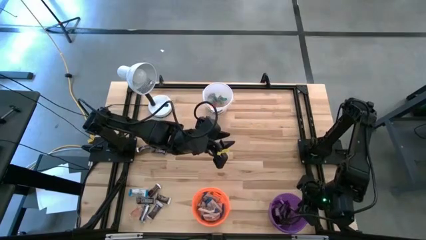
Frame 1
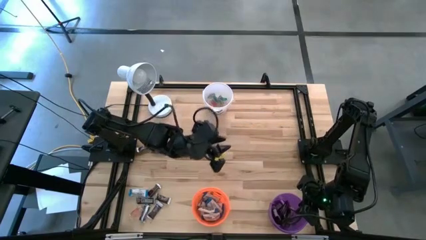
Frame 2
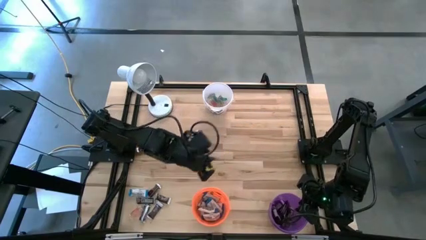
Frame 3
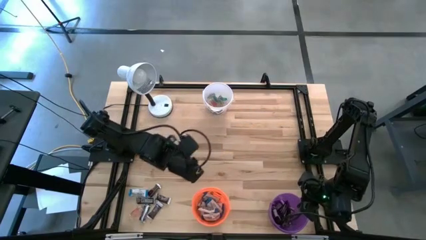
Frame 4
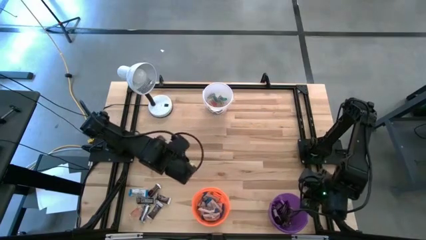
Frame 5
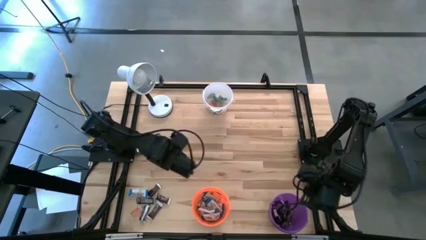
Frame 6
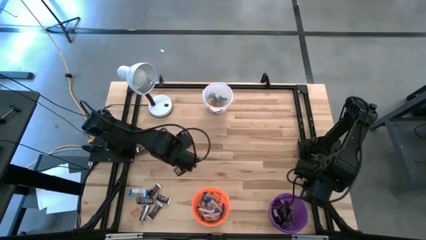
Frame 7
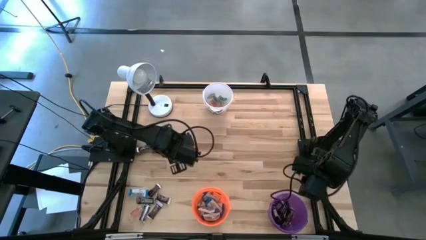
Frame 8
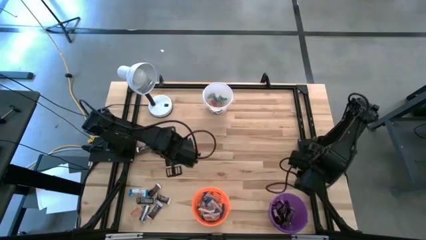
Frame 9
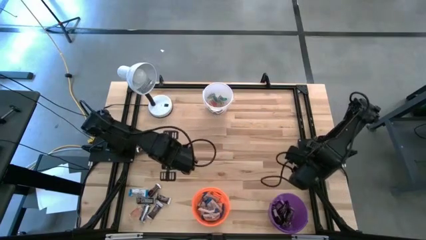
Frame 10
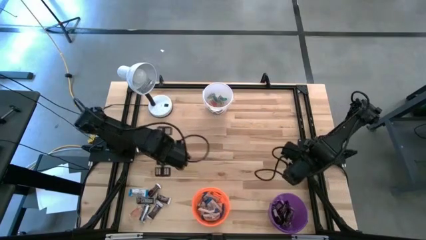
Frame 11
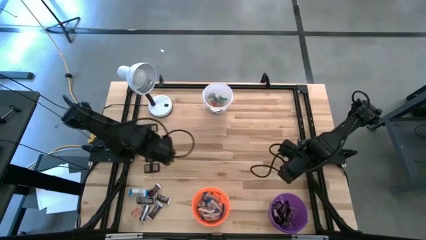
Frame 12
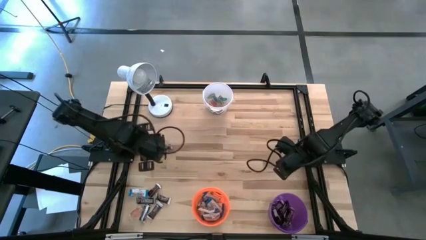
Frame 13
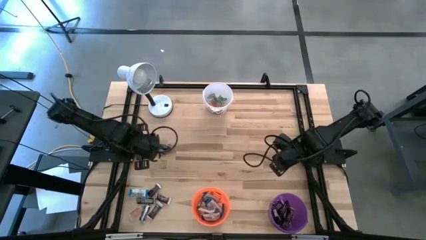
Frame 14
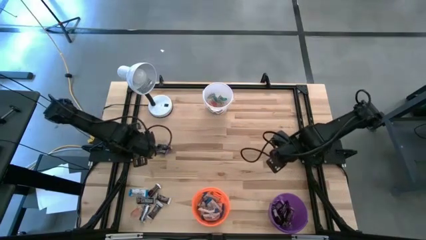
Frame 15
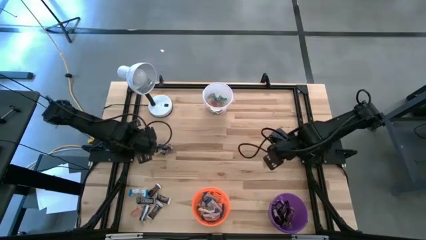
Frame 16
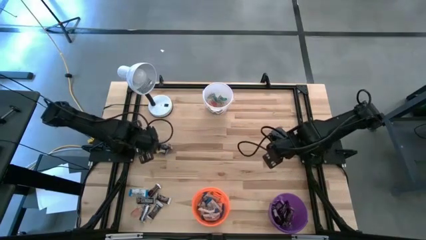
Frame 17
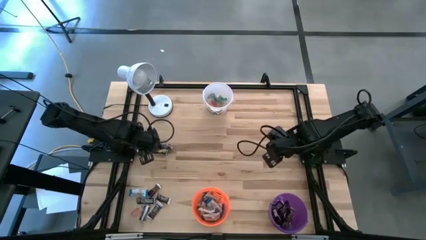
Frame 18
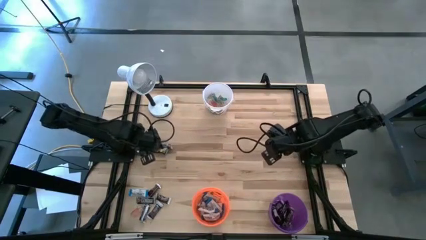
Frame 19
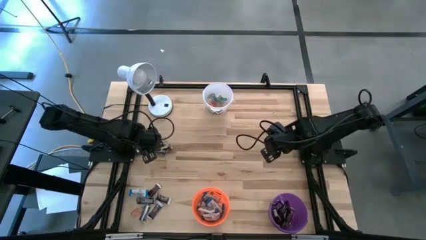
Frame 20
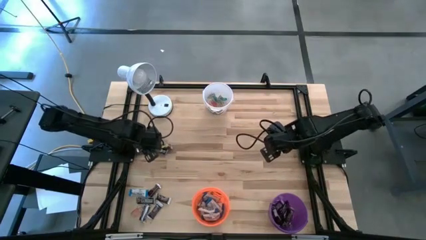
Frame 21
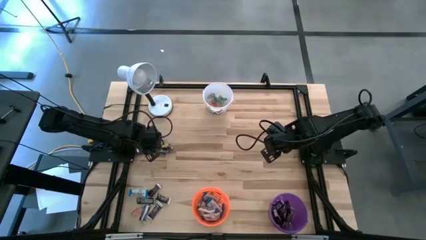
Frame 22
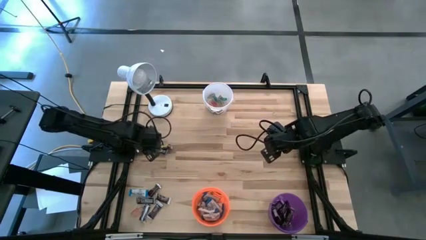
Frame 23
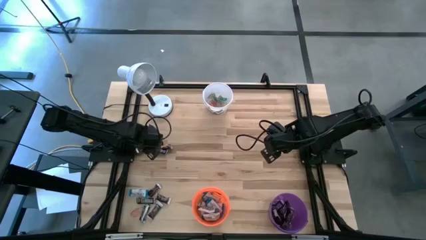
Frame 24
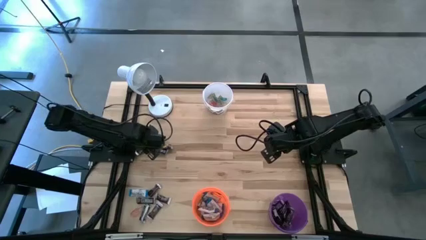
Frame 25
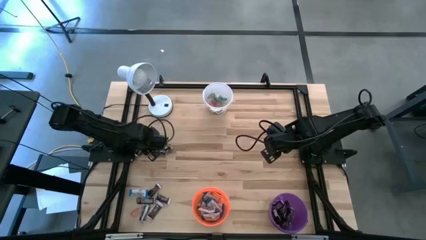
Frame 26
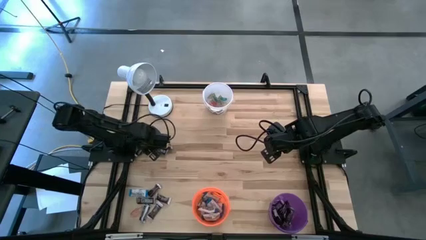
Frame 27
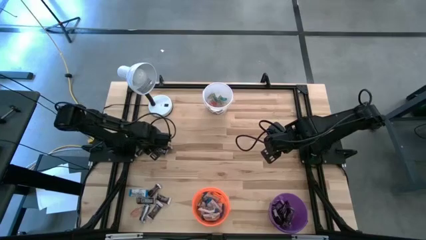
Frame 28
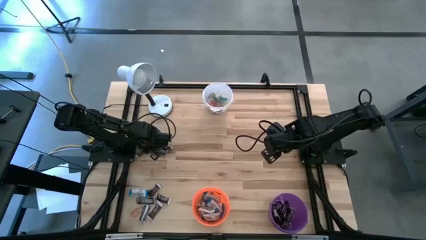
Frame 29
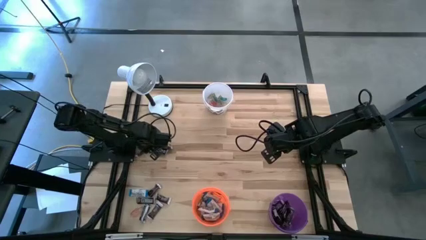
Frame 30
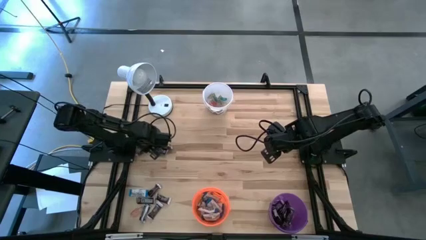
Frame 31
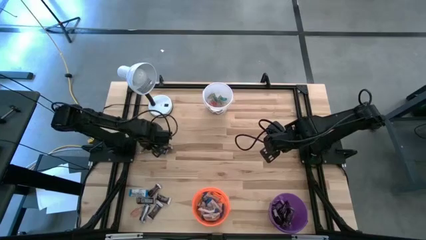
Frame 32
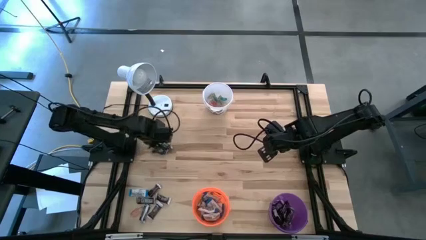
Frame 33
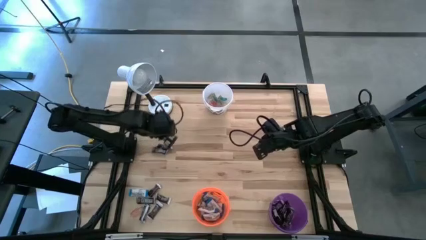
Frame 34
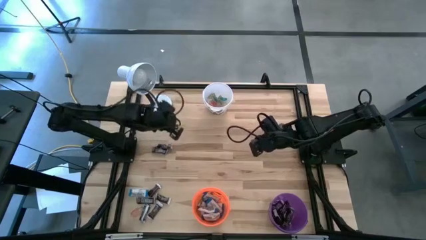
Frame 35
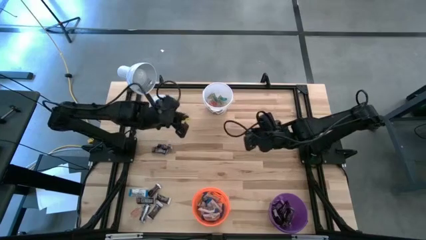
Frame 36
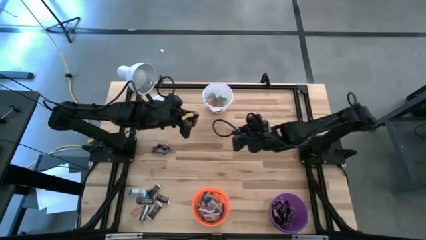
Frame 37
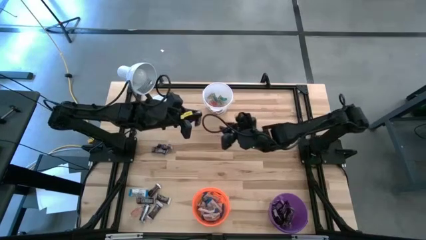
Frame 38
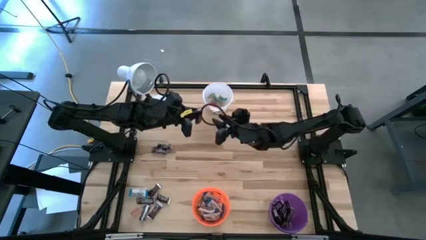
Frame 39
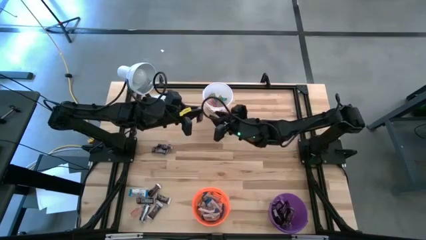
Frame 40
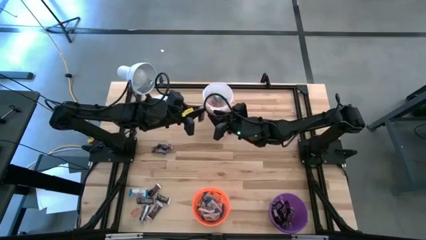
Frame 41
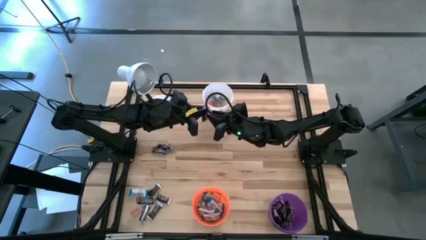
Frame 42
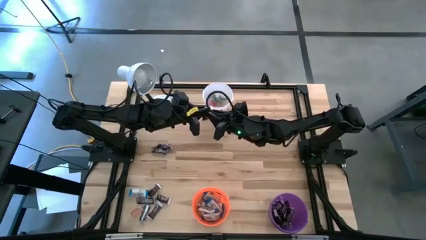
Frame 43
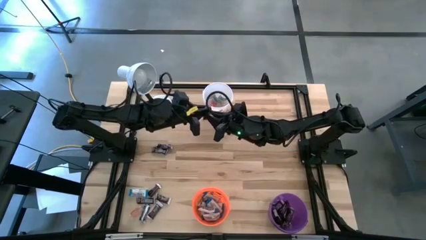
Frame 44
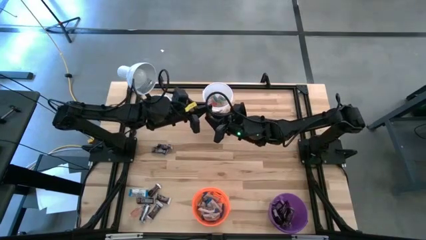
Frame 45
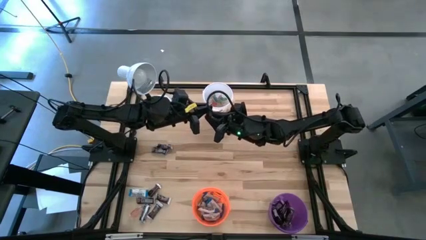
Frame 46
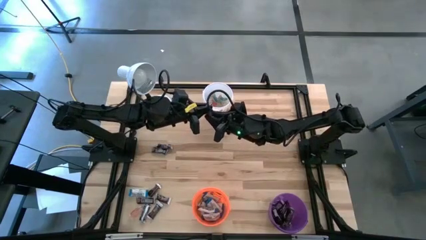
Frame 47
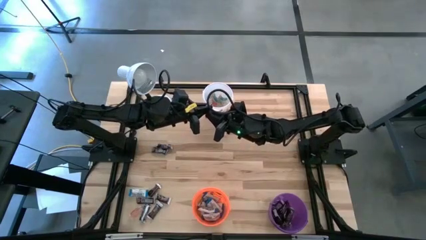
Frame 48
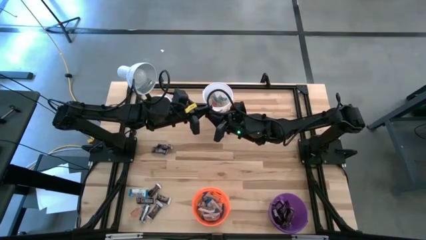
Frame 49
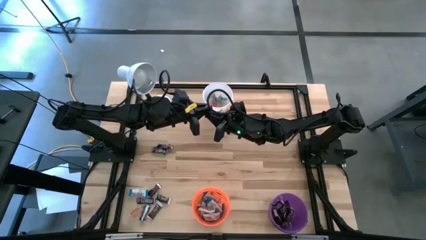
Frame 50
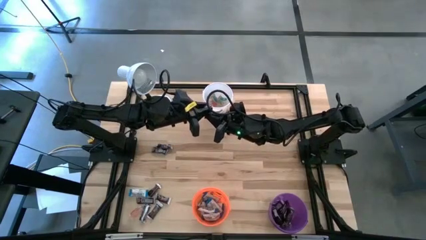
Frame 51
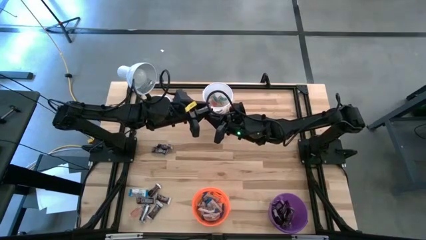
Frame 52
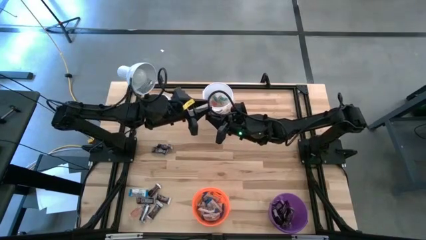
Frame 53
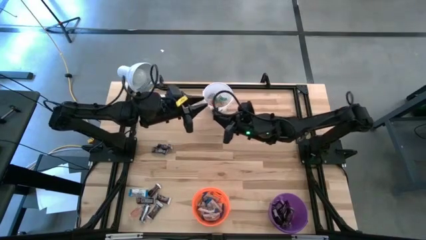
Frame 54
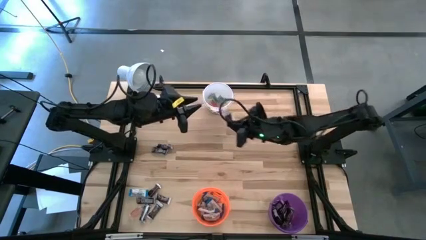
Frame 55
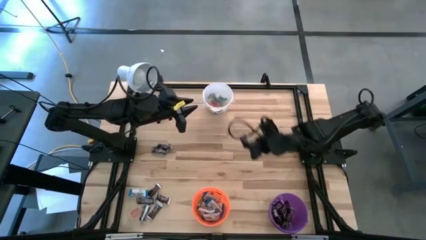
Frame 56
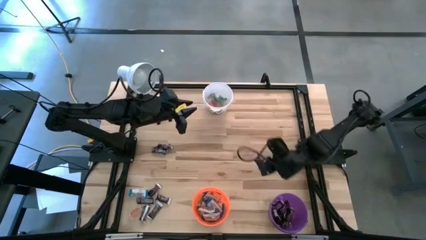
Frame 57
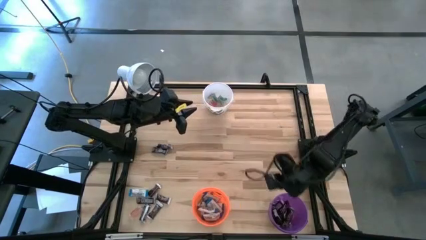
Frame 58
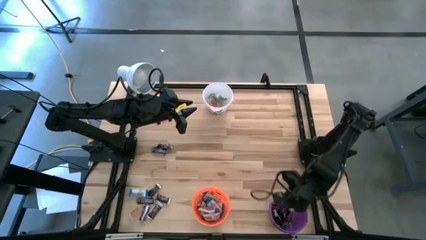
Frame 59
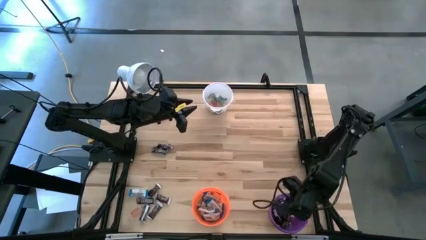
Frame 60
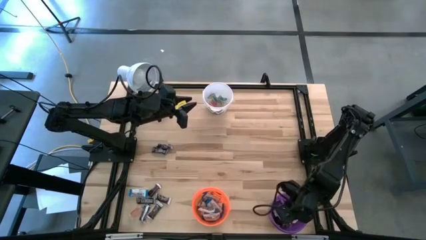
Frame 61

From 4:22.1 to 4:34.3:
Task: Organize candy in baskets
Put the dark brown chocolate bar into the dark purple bucket

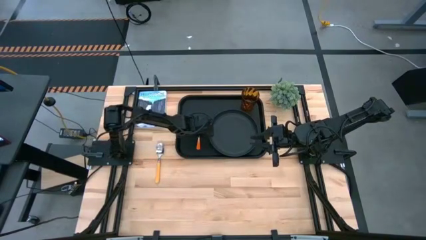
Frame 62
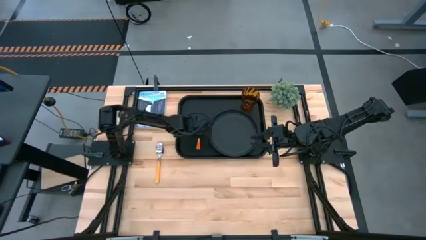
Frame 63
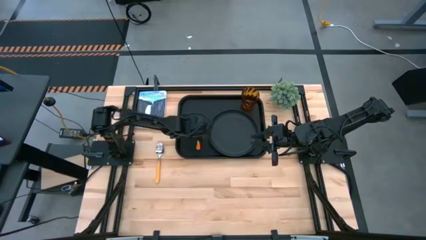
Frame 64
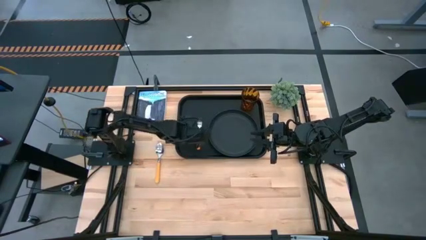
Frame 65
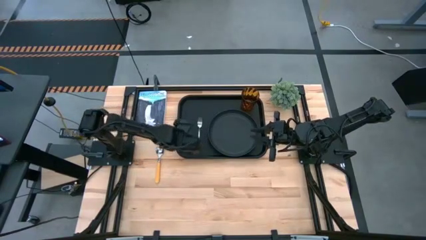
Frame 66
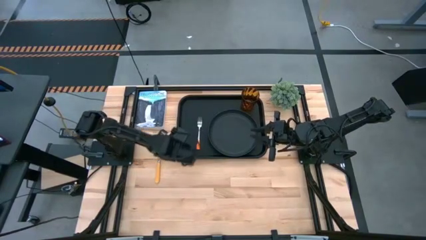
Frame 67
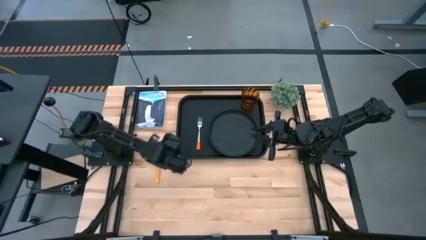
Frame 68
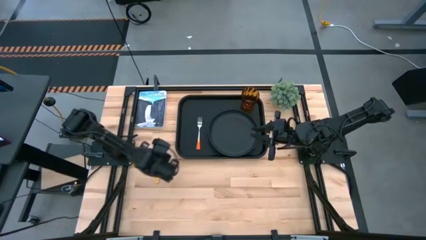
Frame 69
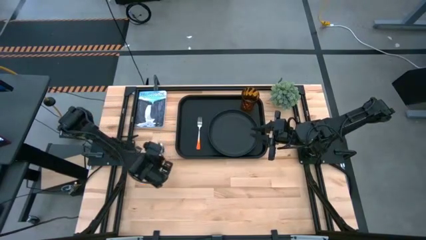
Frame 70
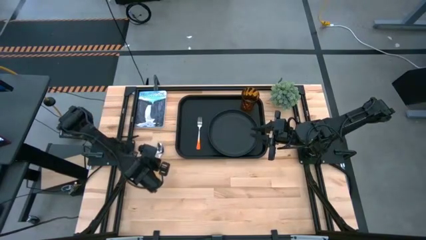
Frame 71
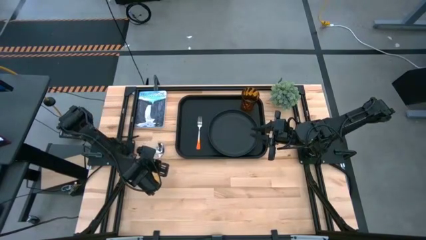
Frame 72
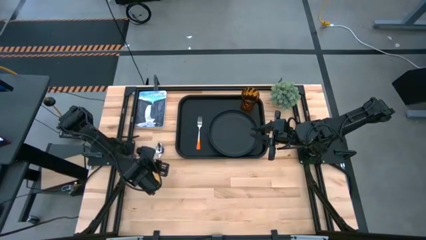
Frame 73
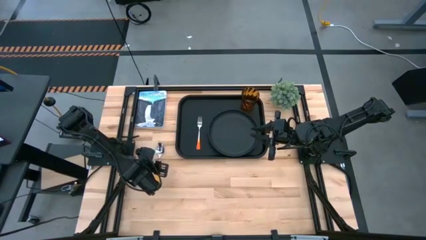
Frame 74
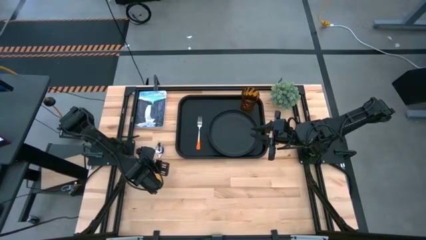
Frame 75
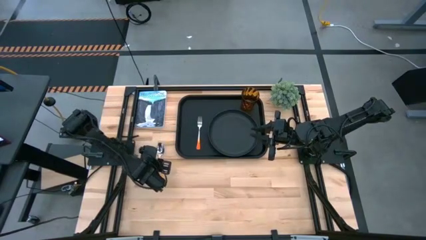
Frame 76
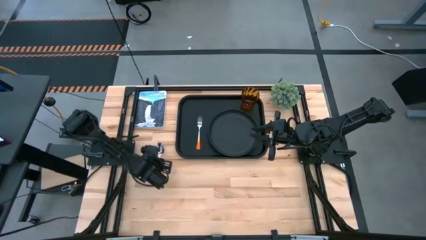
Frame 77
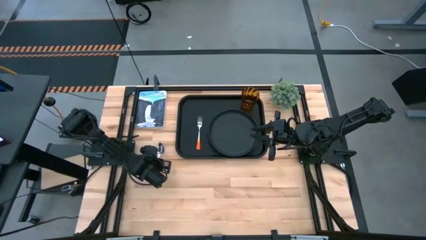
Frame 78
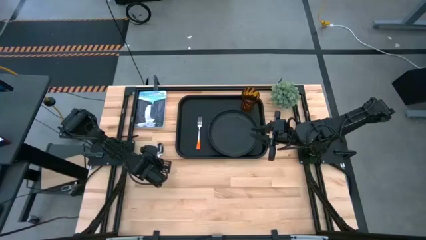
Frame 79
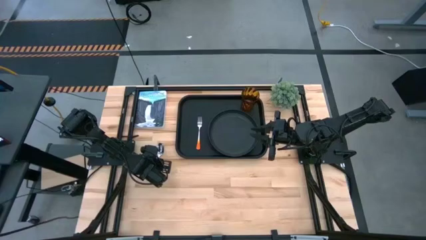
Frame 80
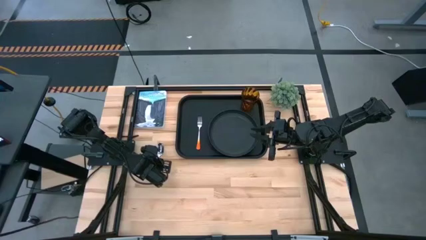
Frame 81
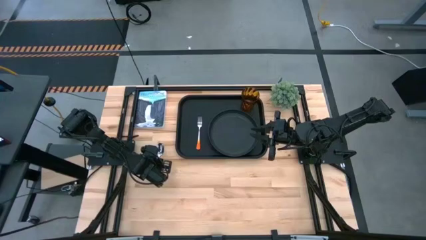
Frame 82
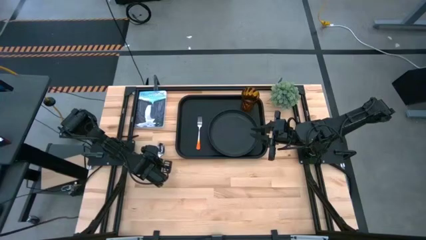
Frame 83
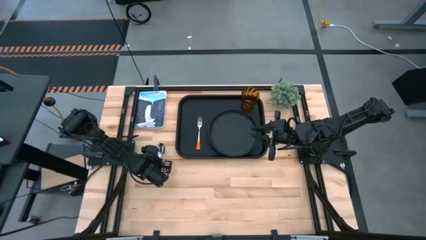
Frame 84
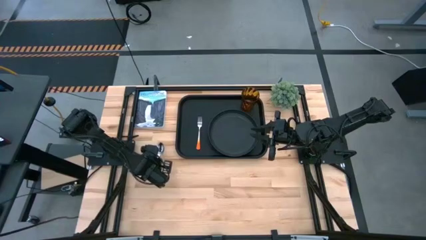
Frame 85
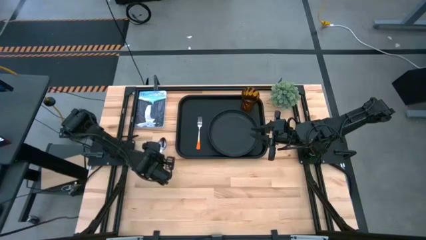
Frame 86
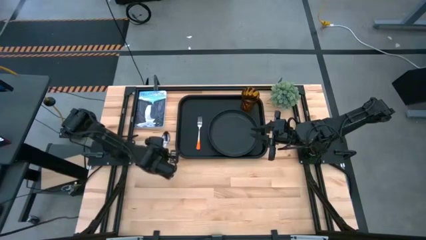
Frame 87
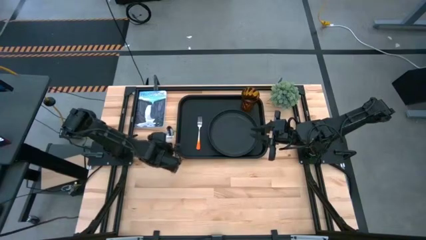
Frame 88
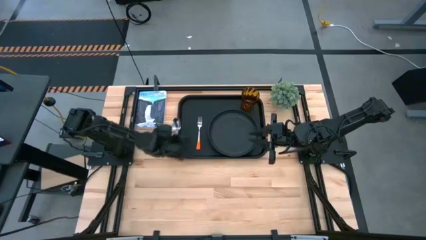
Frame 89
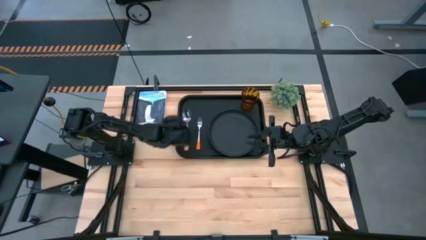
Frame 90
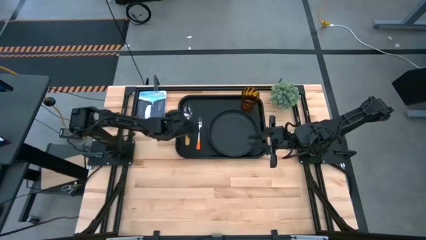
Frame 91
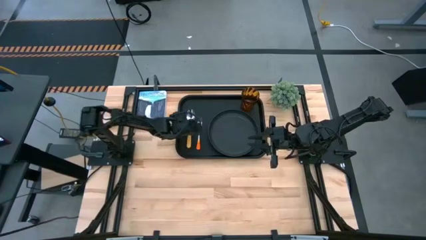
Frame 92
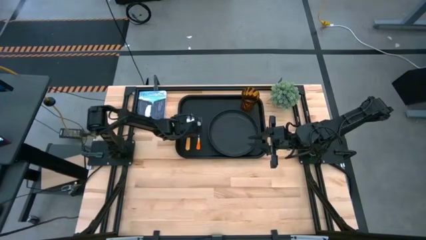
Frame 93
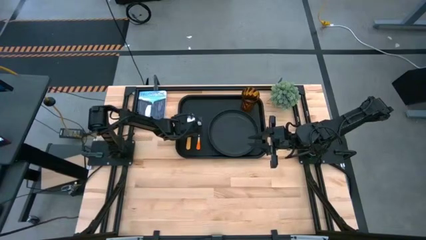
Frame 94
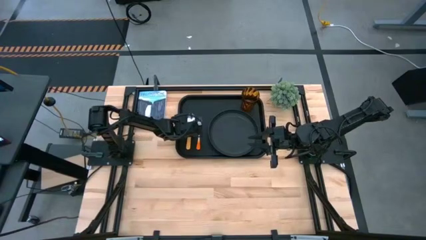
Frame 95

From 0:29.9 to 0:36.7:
Task: Pick and place plate/cup/fork/spoon on tray
Put the yellow spoon on the black tray to the left of the orange fork
